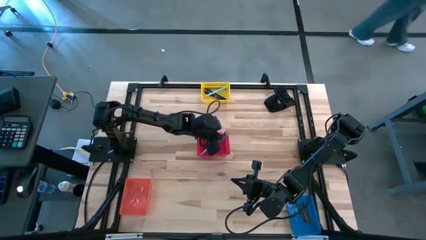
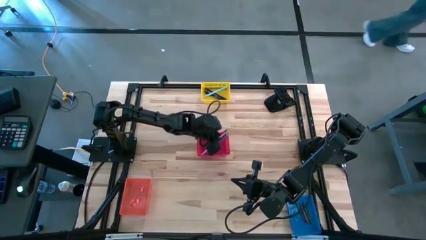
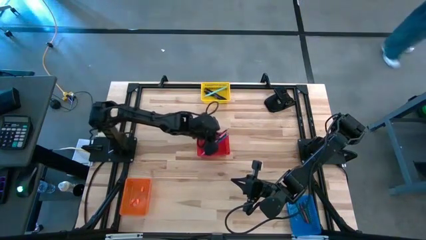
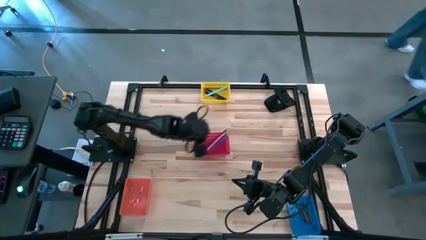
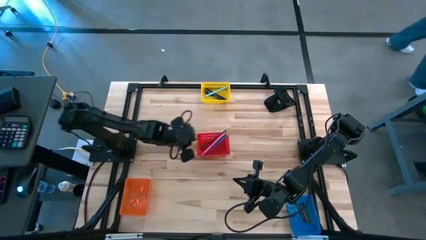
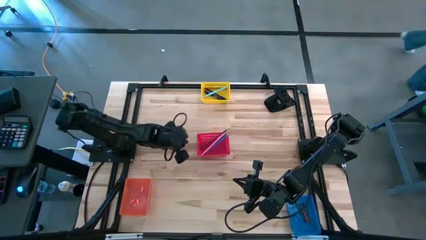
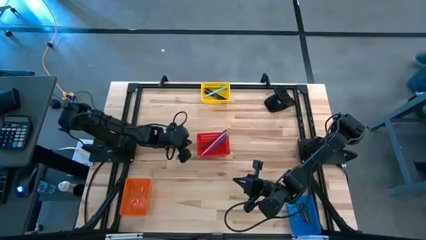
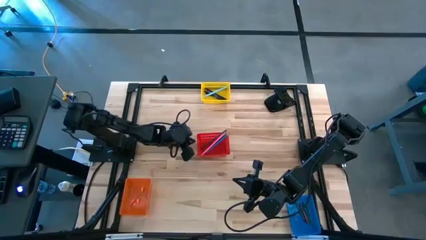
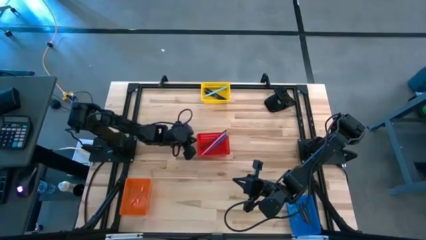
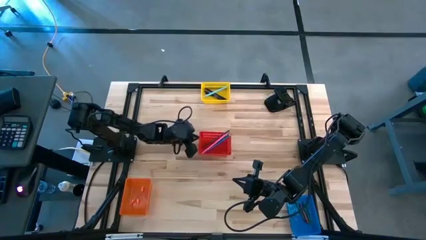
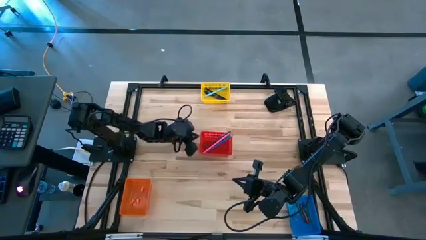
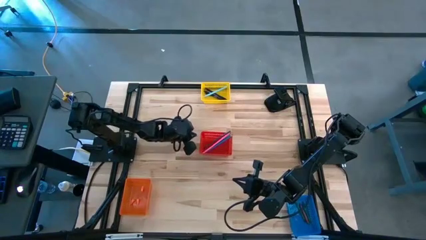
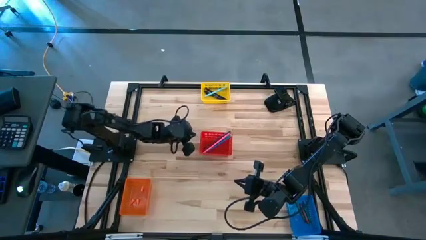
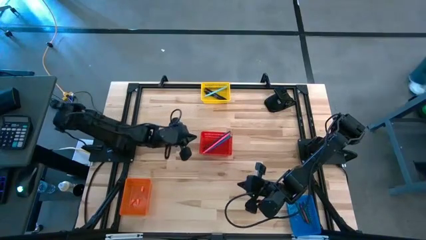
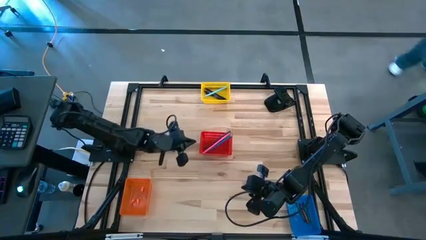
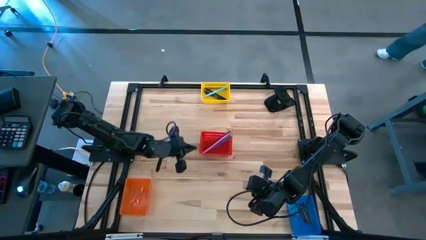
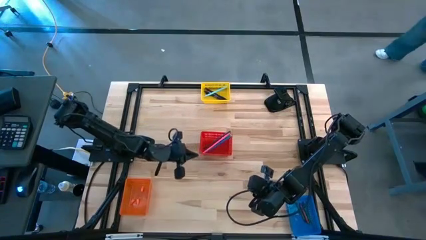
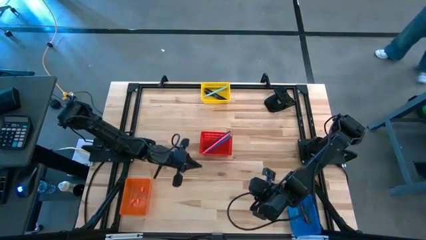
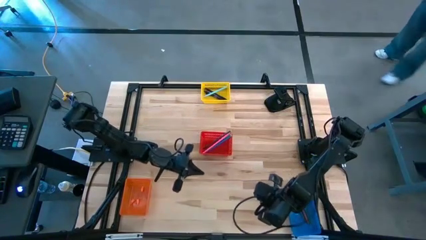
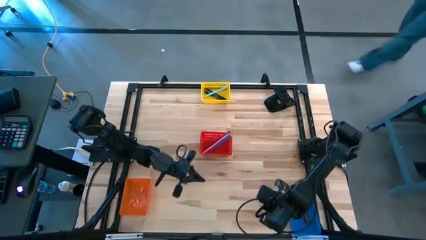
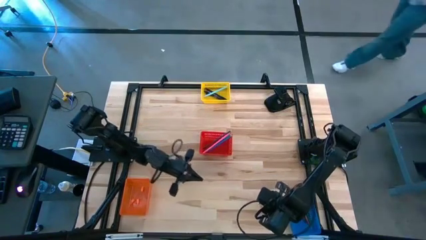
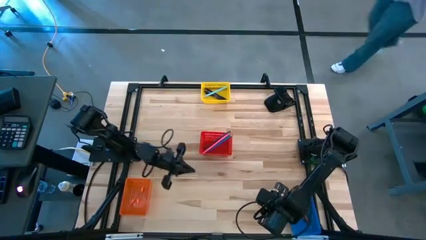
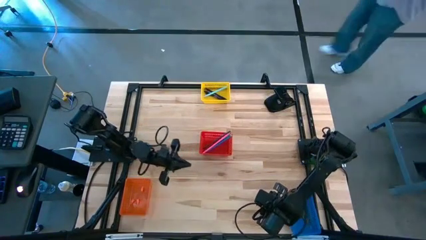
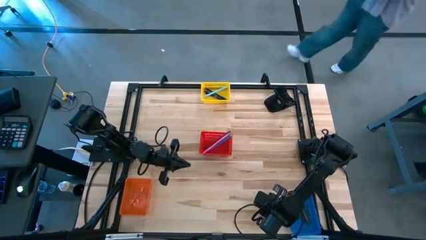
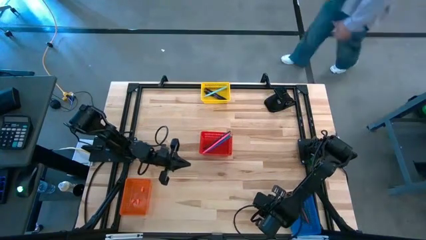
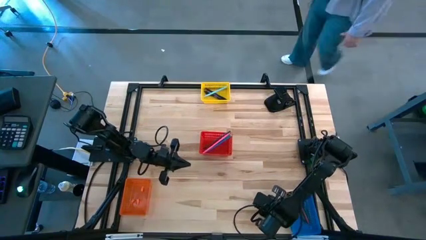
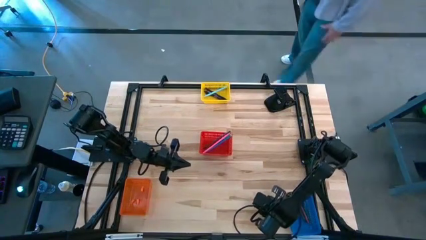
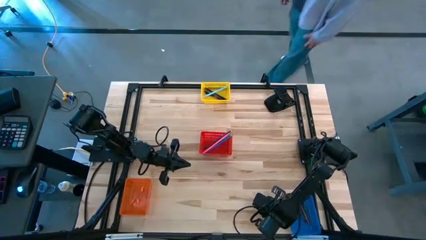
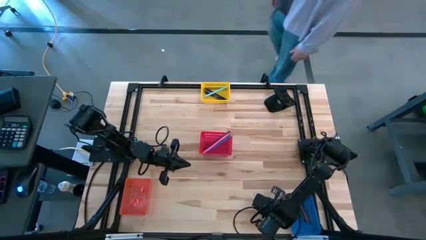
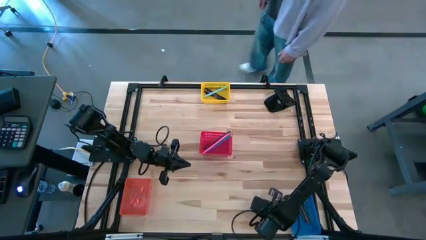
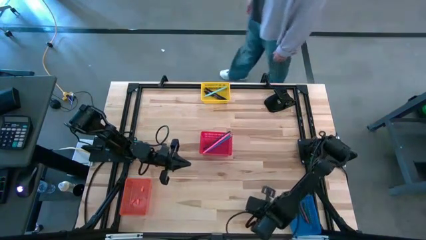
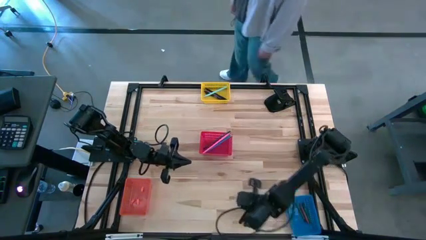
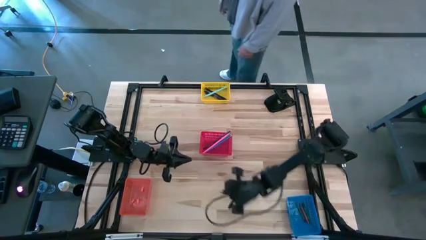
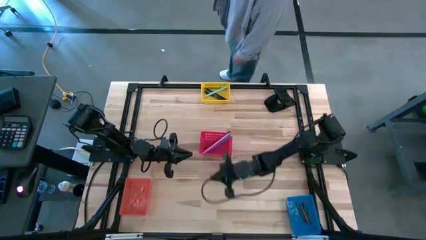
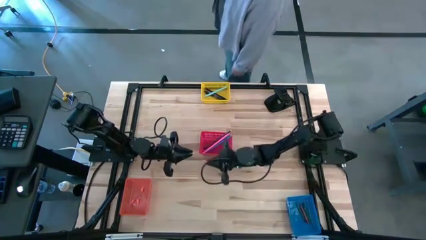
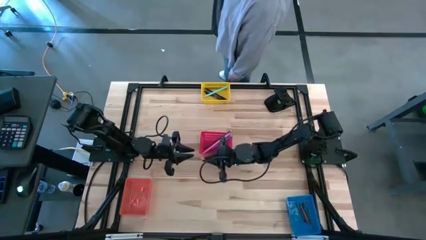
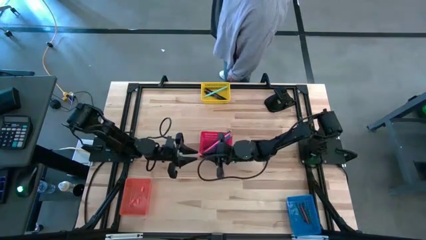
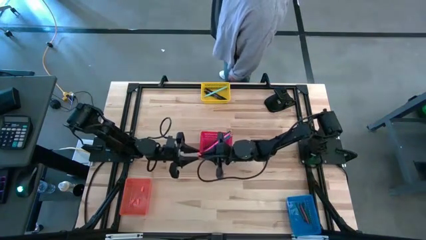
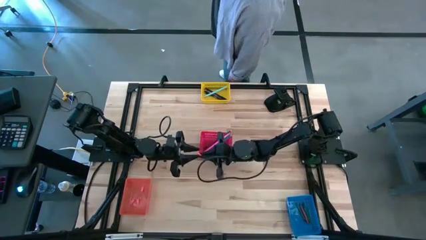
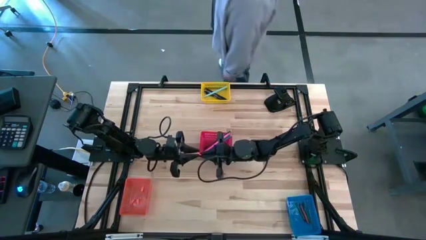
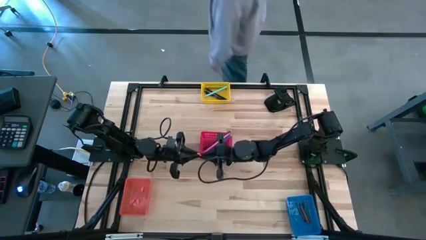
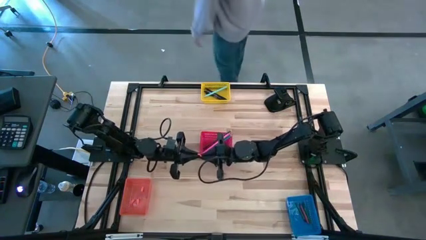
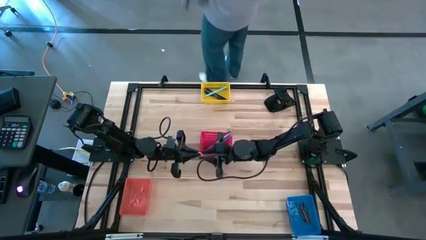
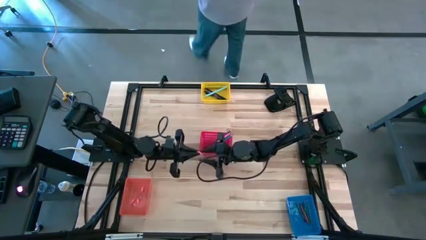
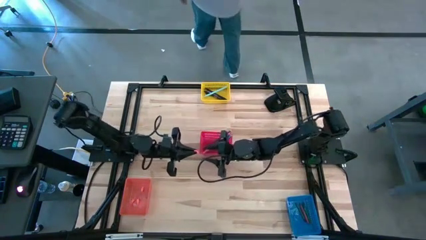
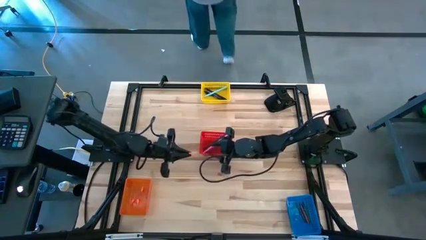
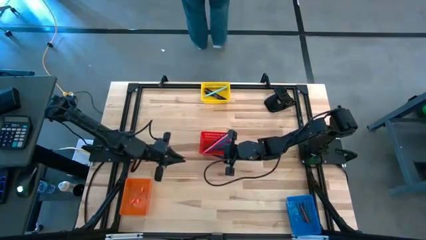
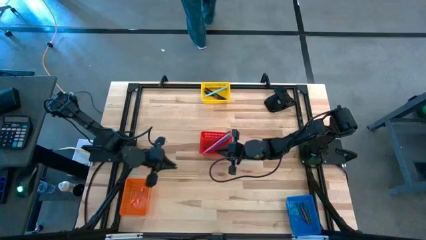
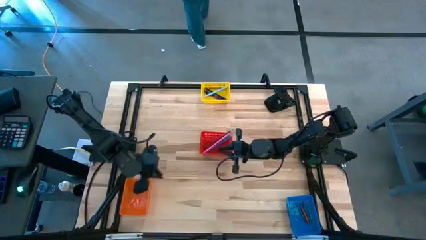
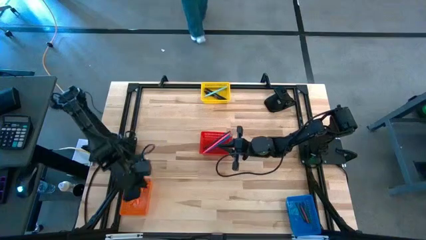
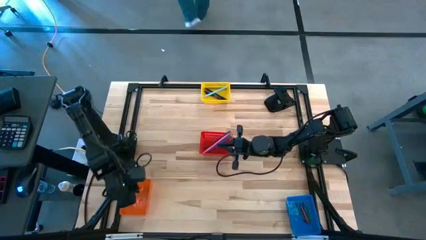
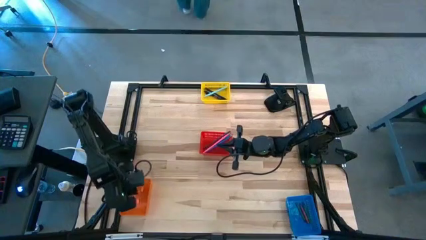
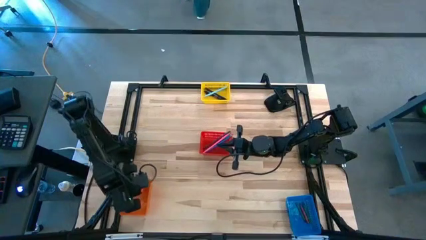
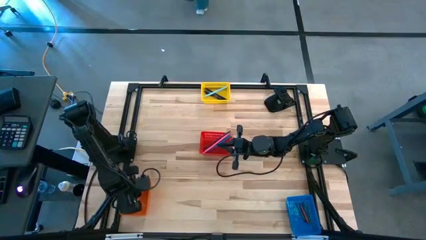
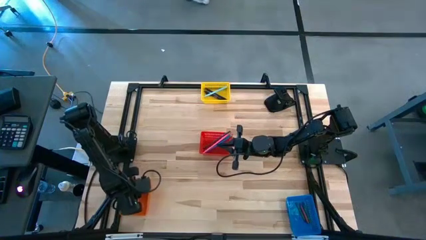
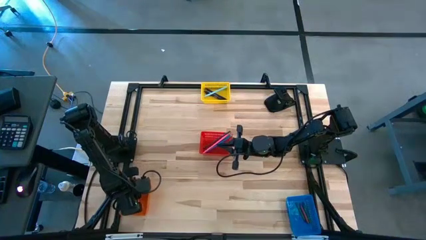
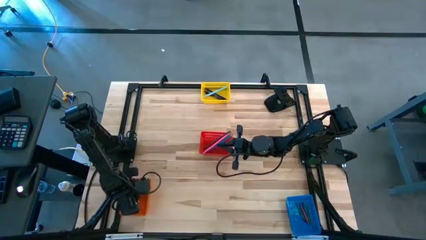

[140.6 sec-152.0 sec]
Task: Sort crayons/erasers/pens/pencils in bins
Put the orange eraser into the orange bin

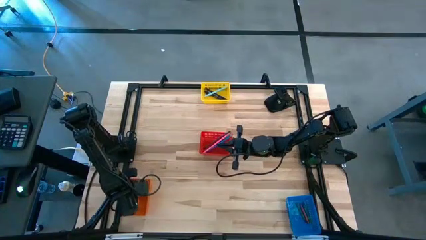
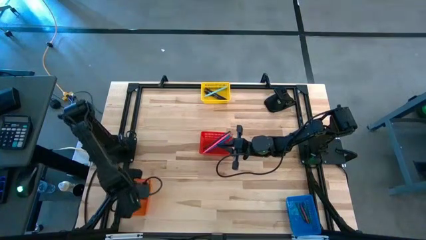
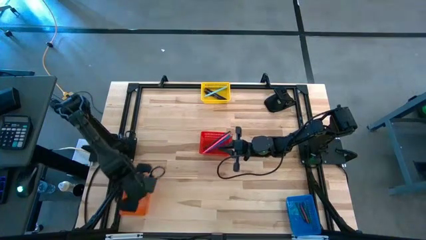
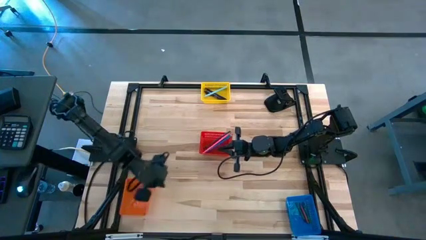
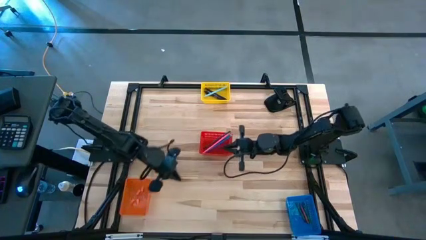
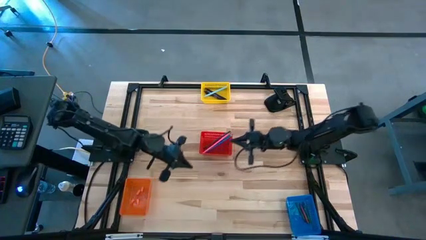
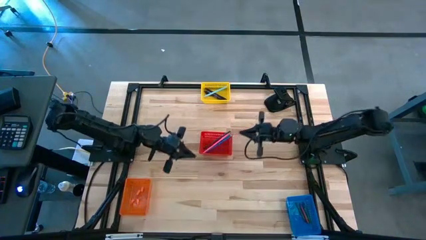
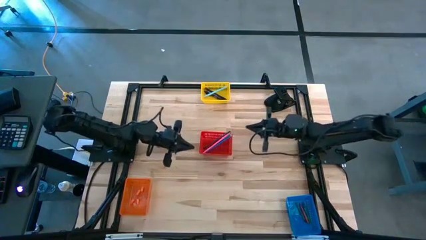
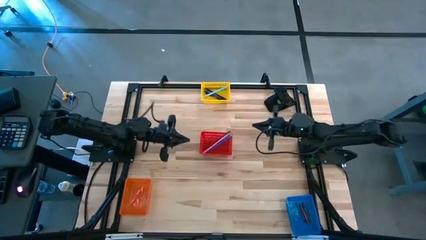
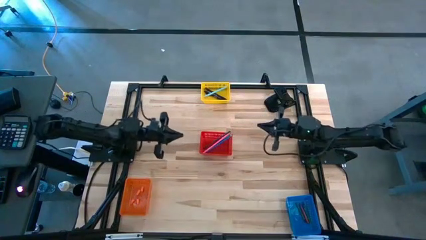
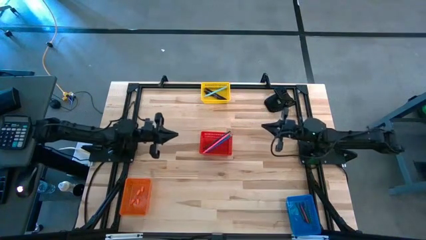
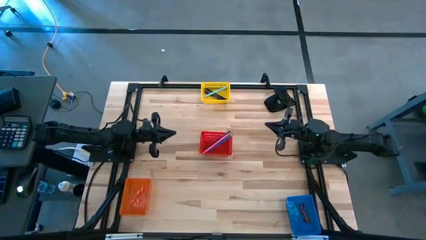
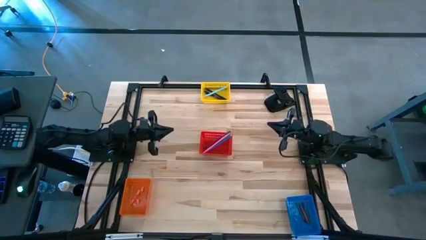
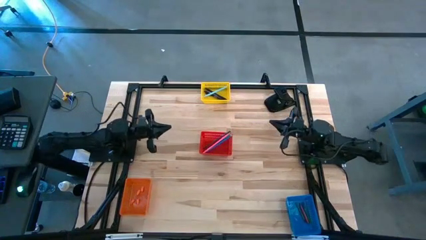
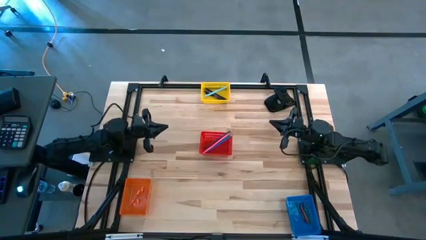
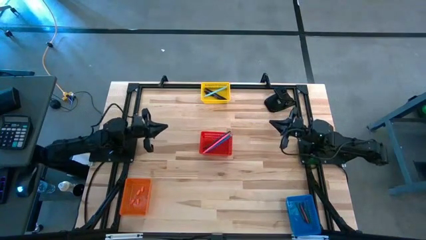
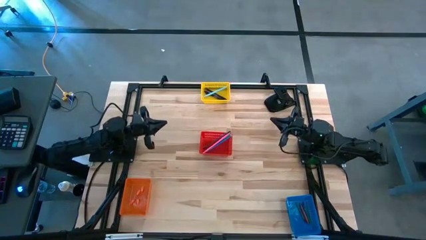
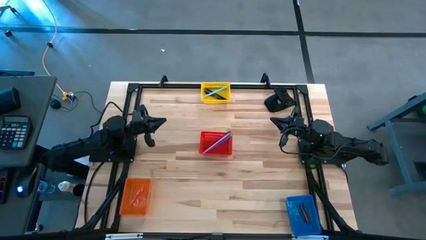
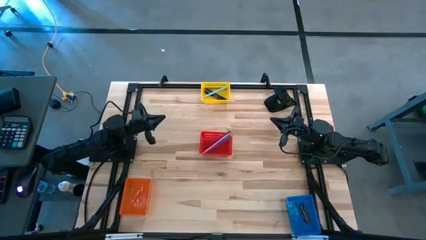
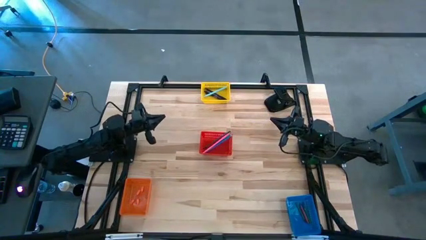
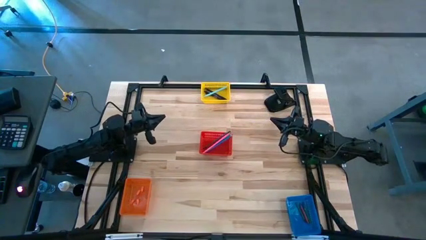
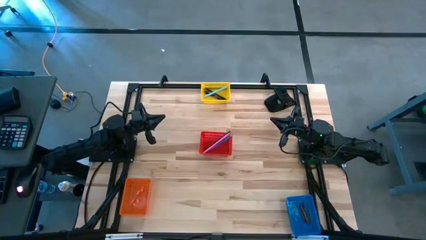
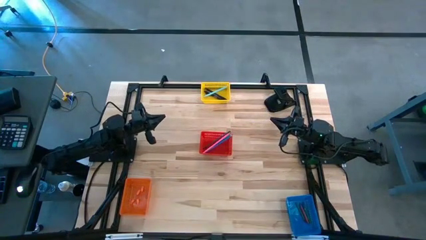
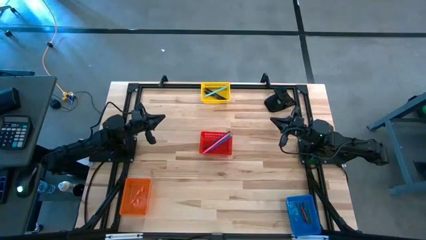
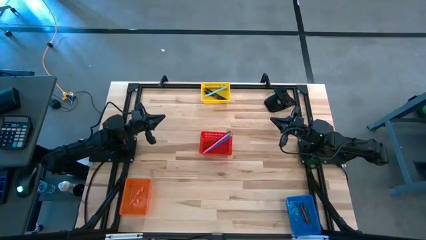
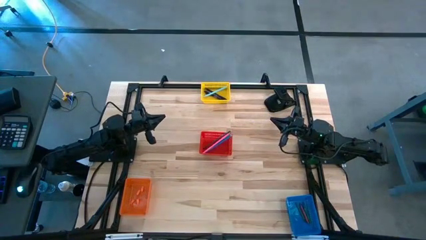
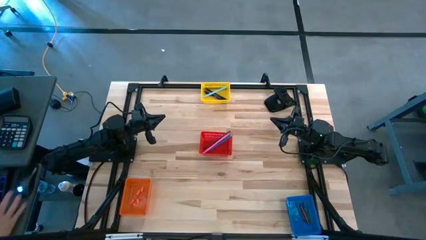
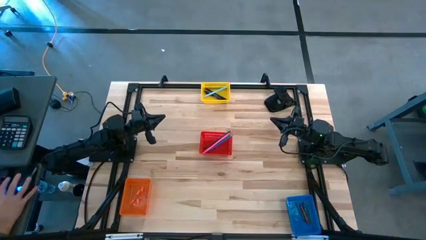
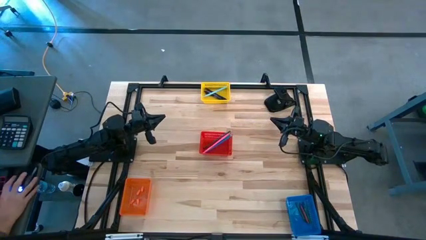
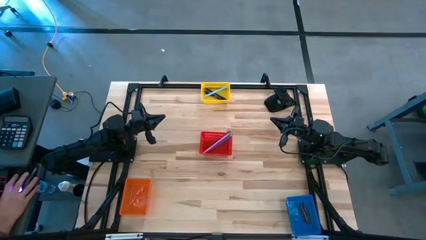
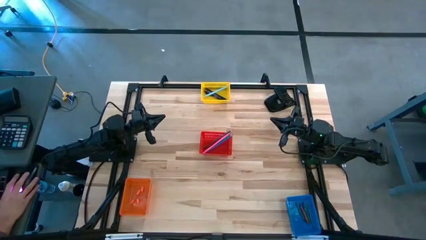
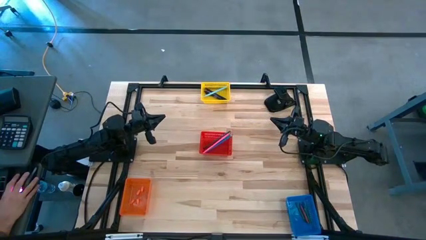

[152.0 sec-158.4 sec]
Return to Home Position
